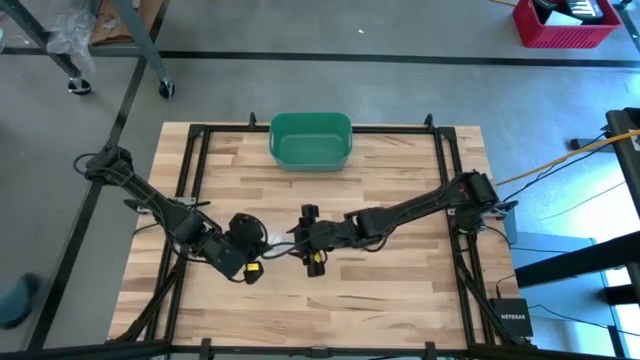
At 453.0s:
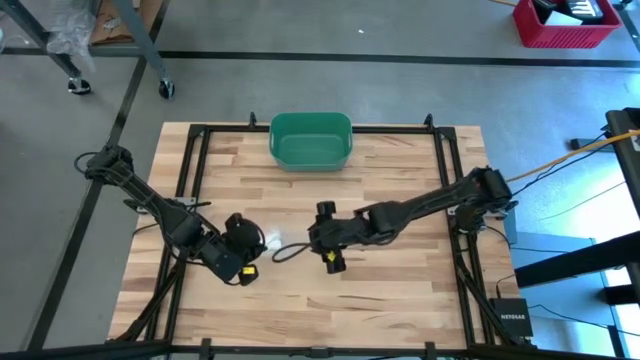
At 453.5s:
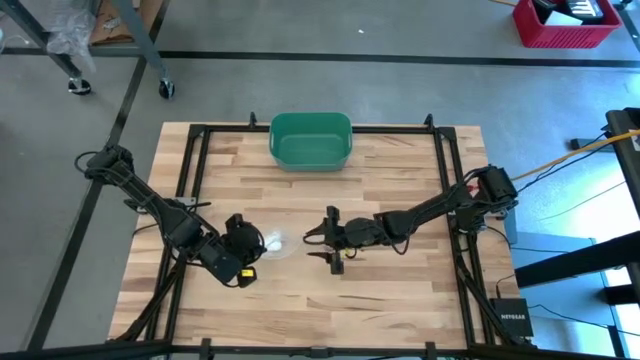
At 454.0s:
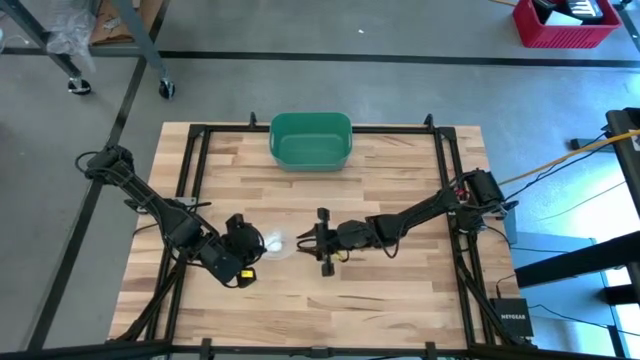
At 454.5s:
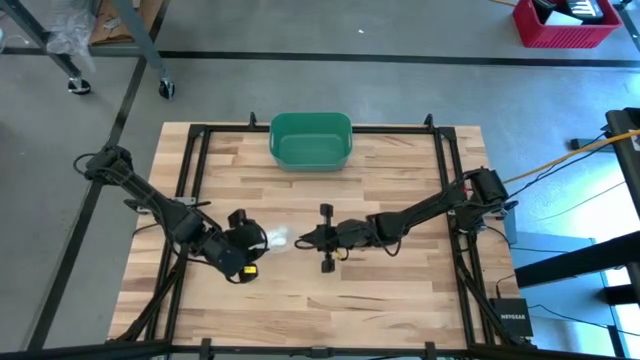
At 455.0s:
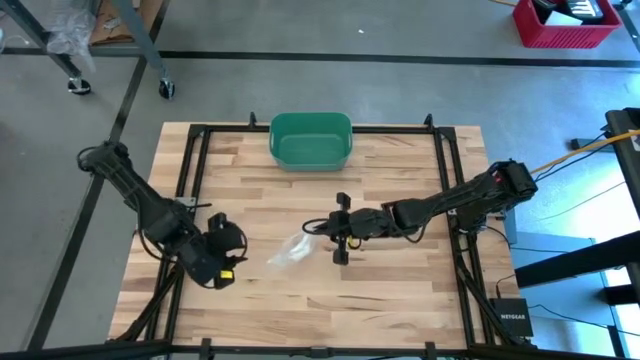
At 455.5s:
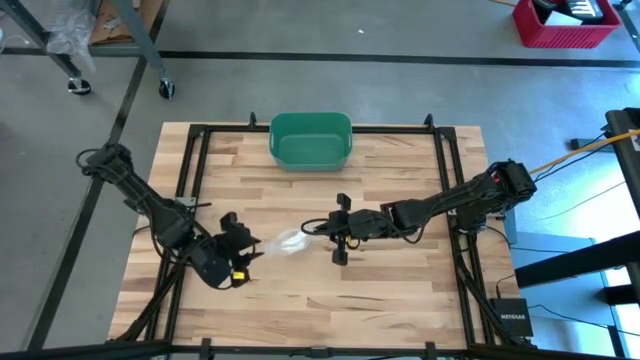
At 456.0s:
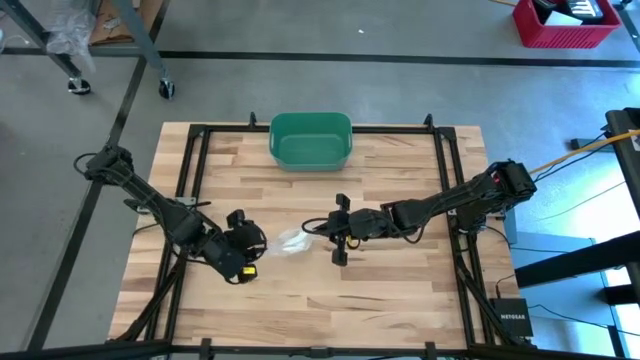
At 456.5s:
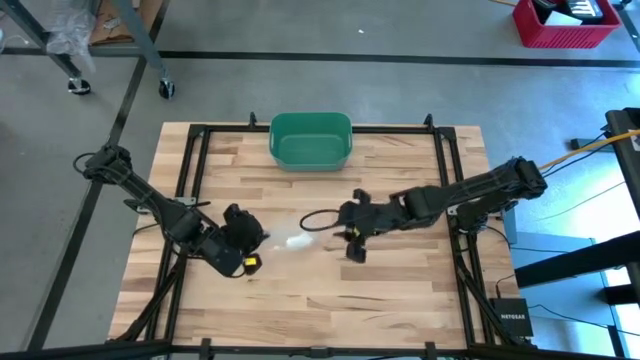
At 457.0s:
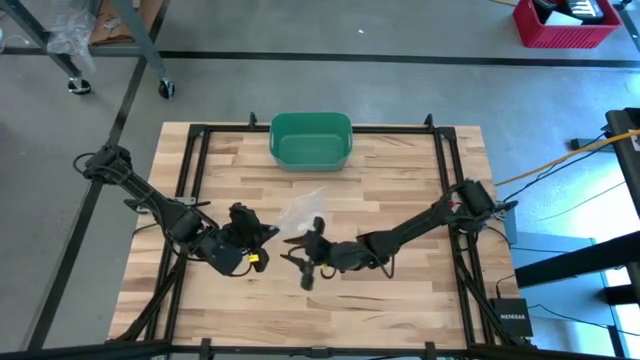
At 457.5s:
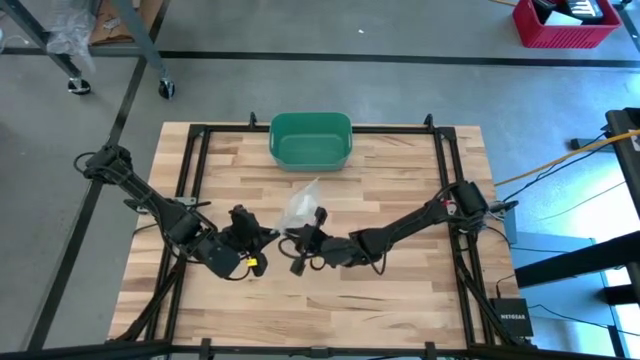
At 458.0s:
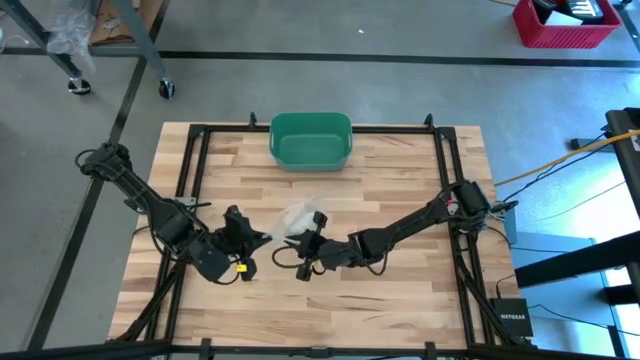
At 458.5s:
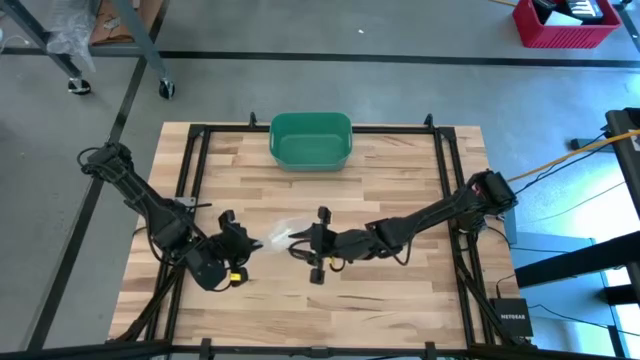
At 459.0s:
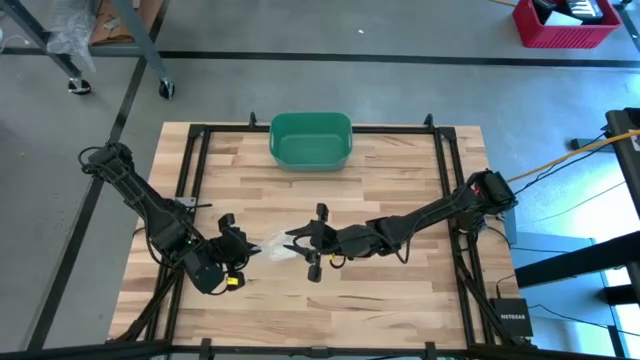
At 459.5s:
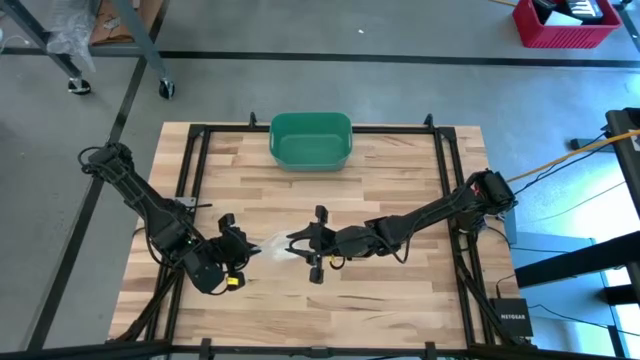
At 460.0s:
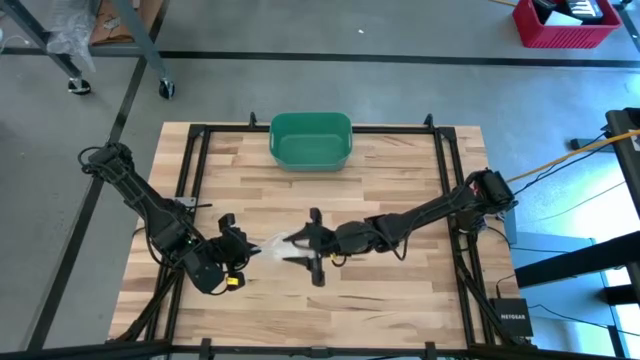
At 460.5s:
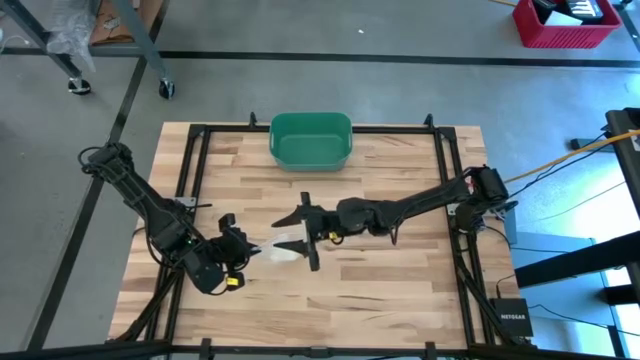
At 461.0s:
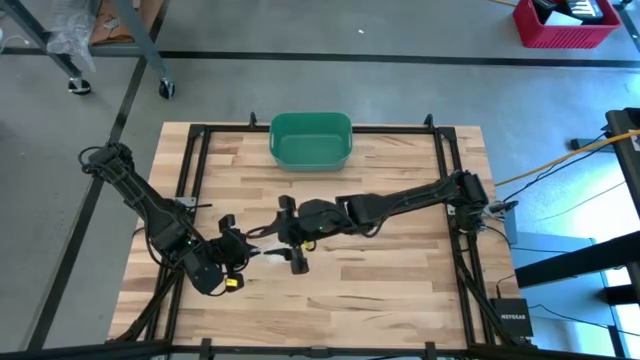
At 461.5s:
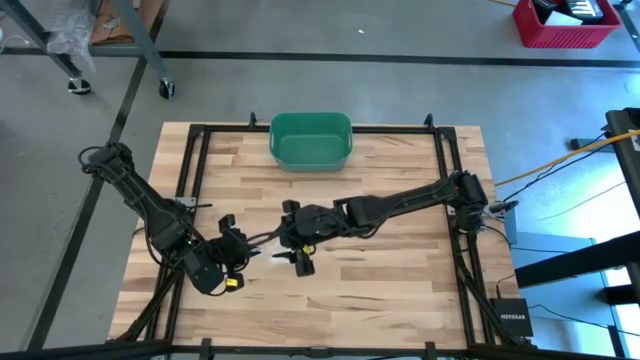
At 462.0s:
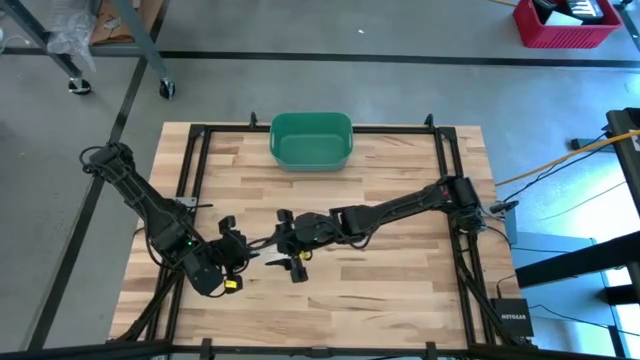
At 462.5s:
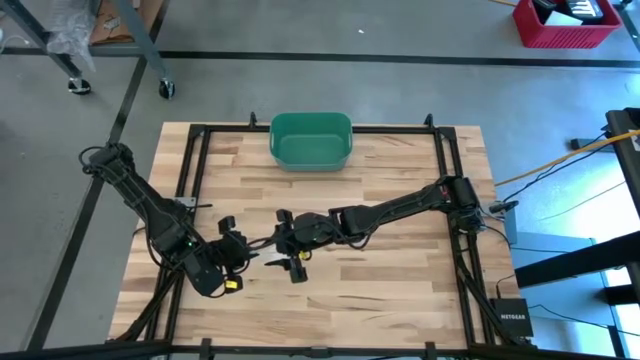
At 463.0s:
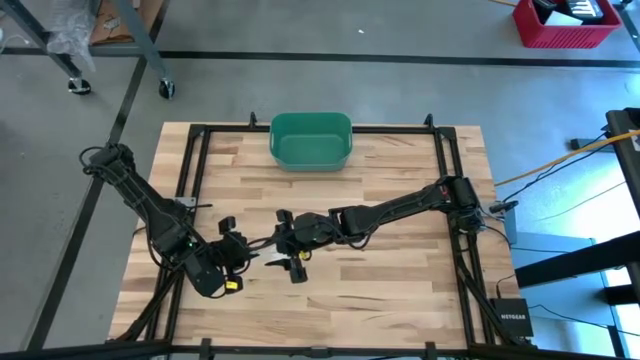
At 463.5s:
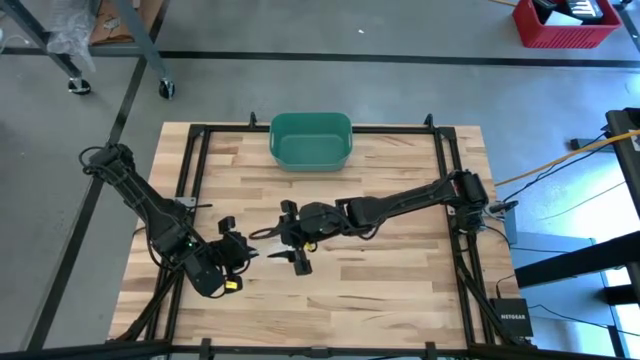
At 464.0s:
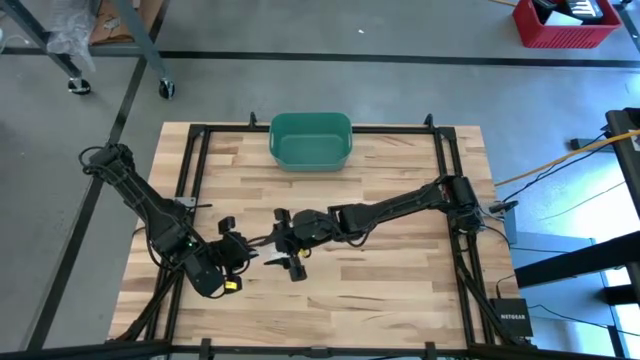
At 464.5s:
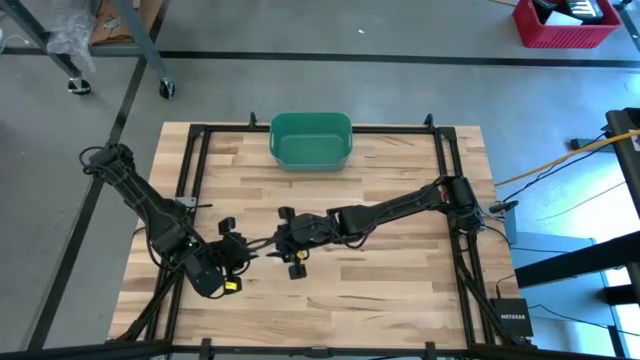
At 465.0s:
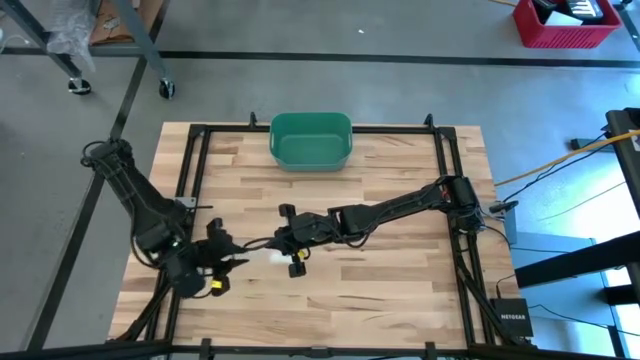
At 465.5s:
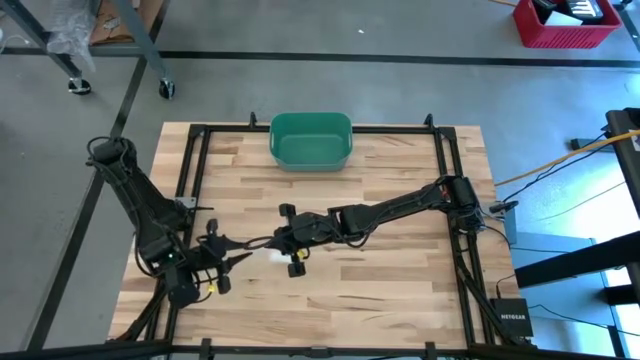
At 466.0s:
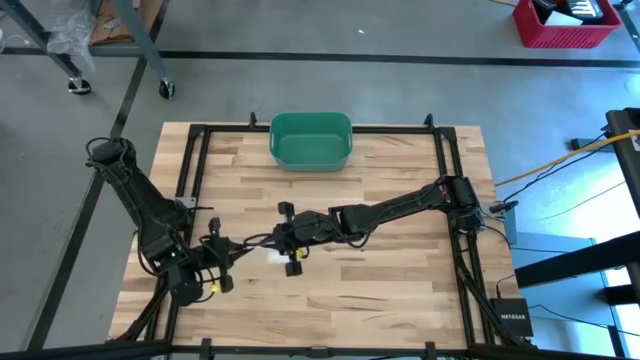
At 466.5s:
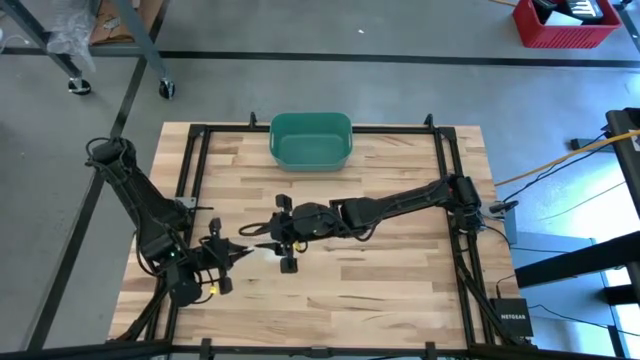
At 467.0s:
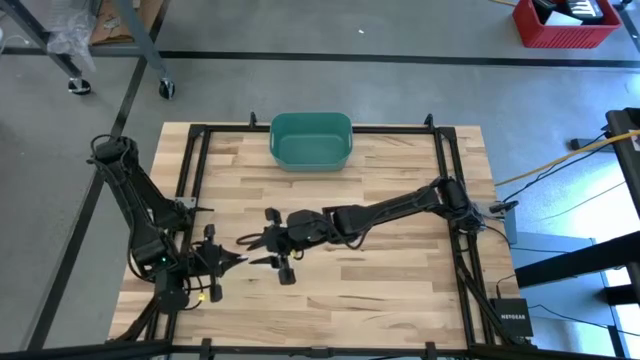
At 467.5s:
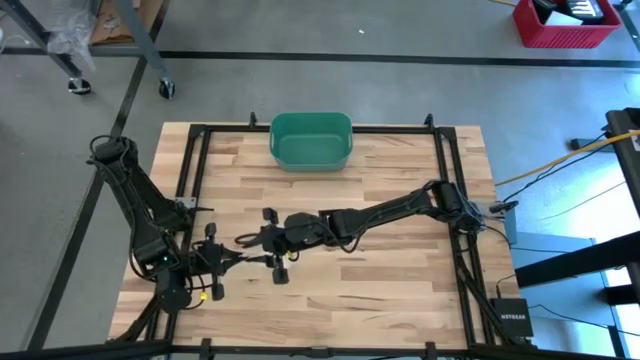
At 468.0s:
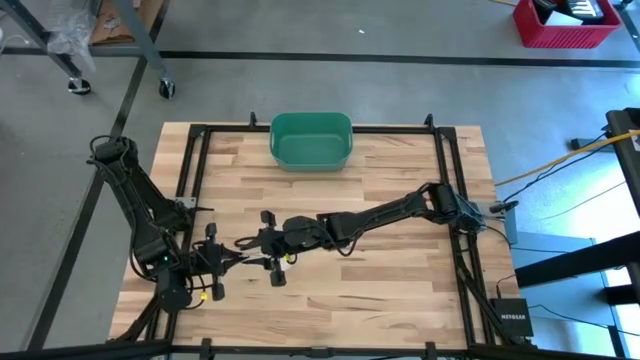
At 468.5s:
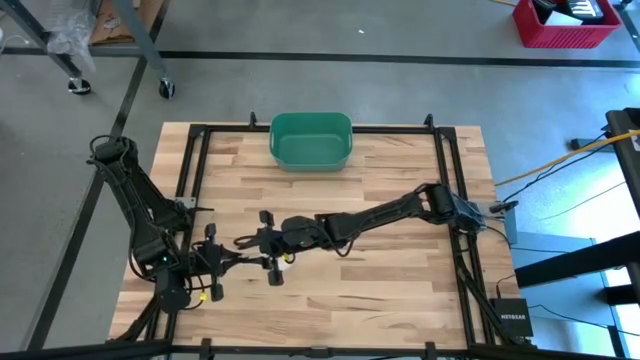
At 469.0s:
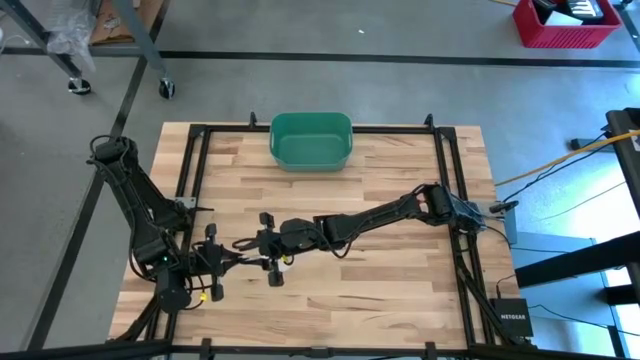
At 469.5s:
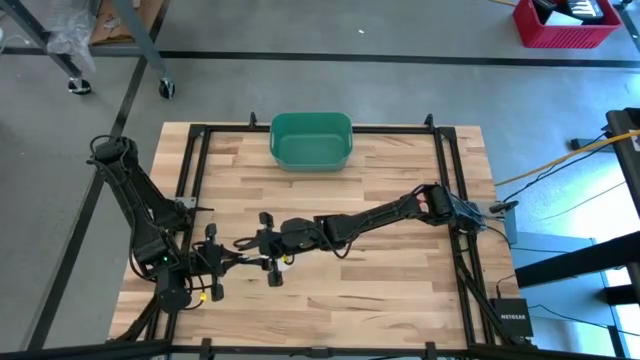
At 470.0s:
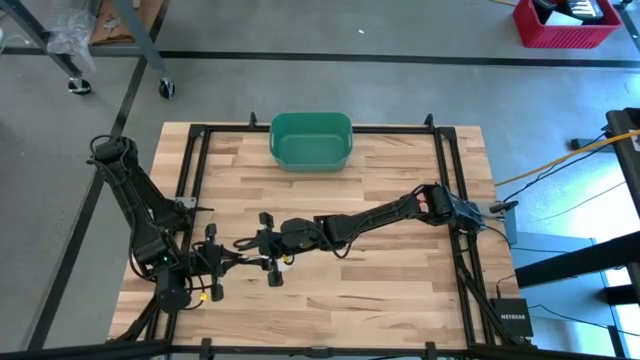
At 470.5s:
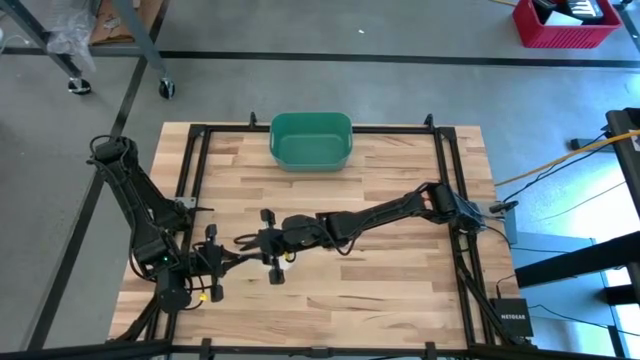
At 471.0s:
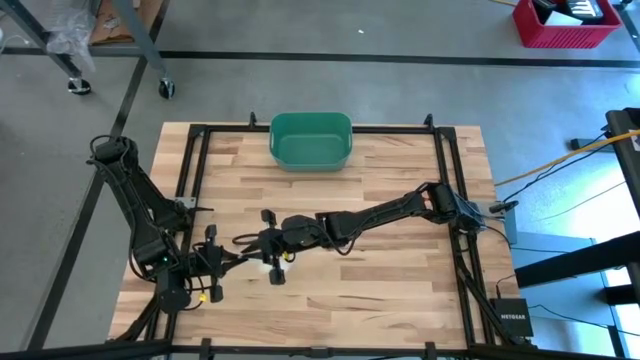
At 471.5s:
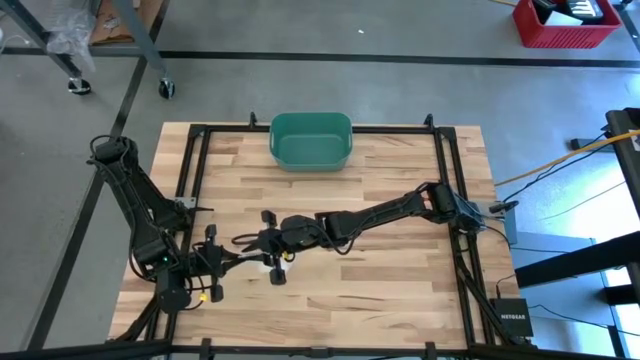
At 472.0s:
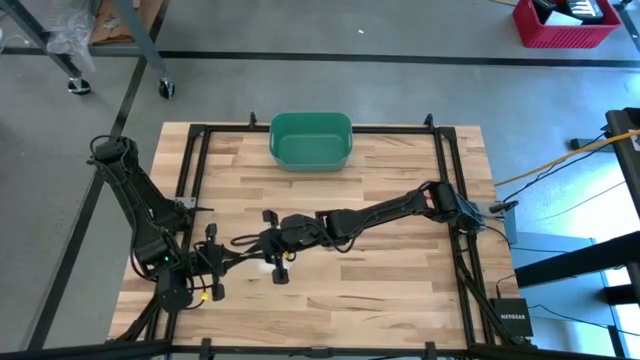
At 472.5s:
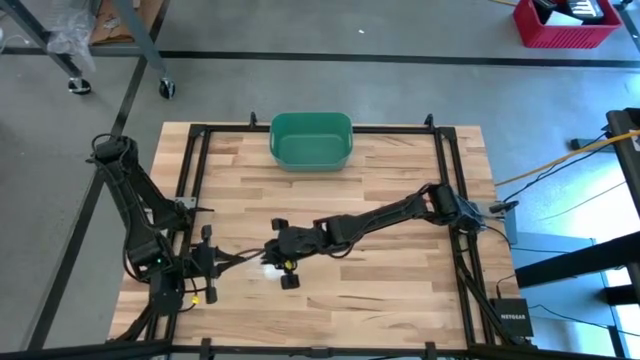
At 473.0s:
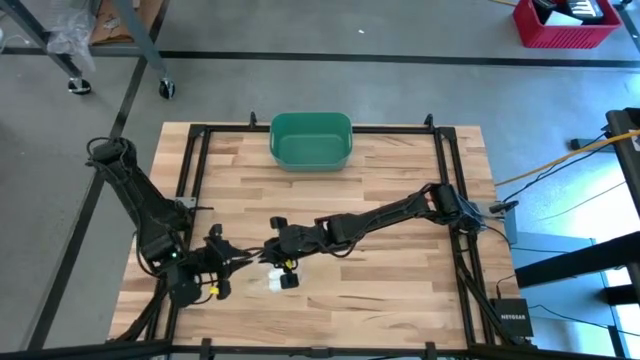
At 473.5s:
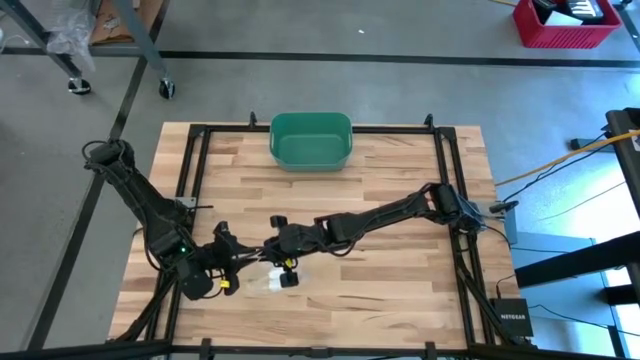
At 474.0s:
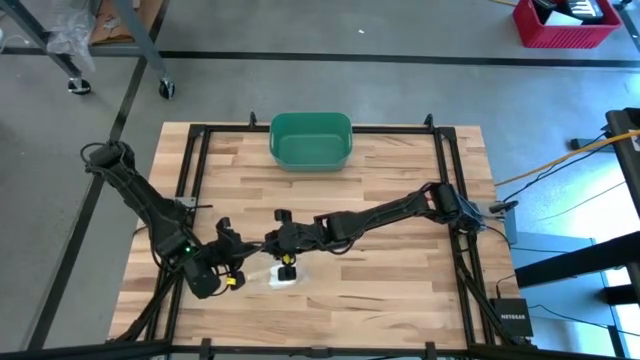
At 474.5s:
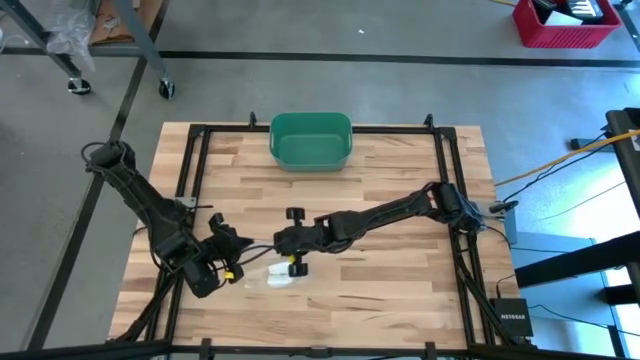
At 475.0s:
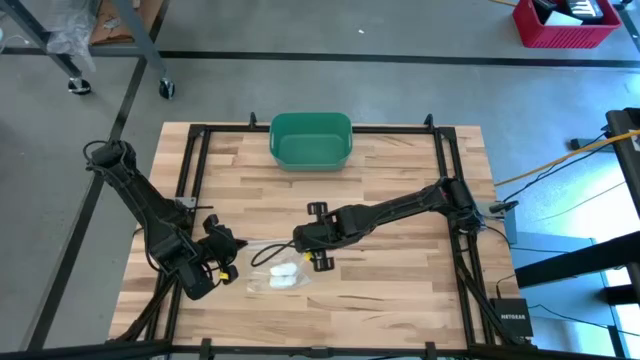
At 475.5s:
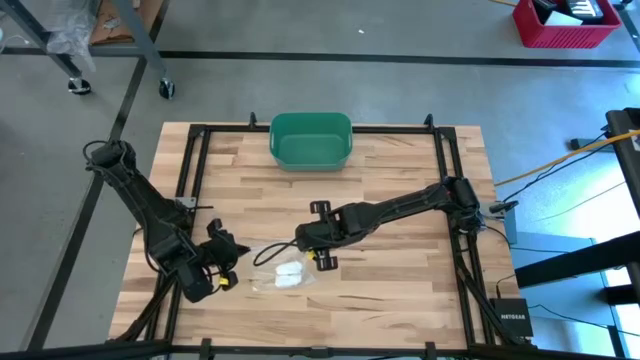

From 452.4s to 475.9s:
Task: Roll bandage
Close the transparent zip bag
